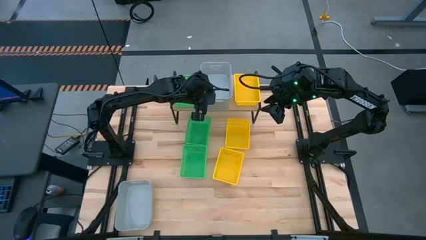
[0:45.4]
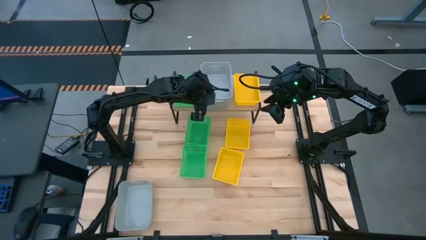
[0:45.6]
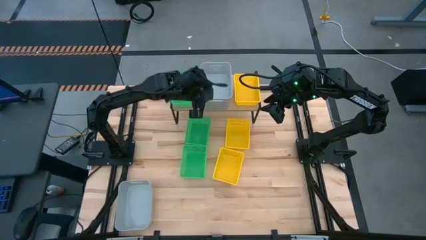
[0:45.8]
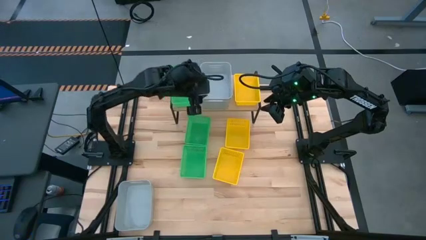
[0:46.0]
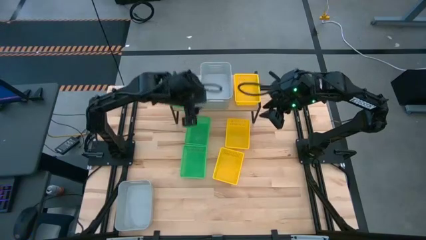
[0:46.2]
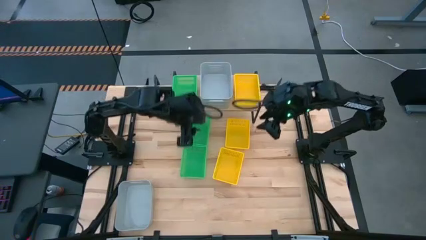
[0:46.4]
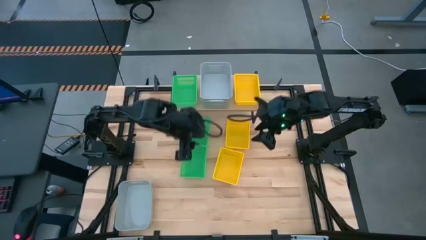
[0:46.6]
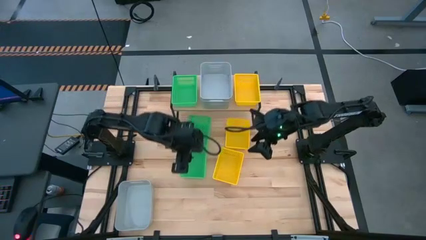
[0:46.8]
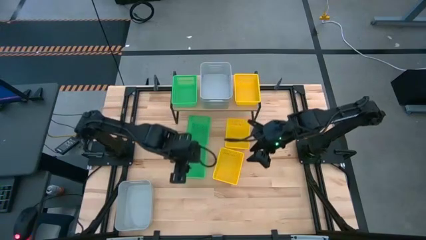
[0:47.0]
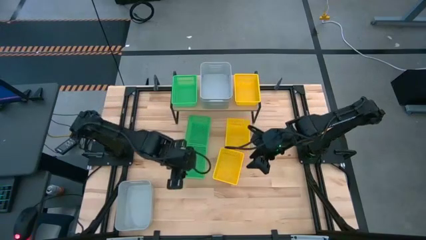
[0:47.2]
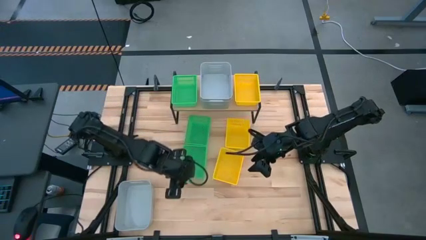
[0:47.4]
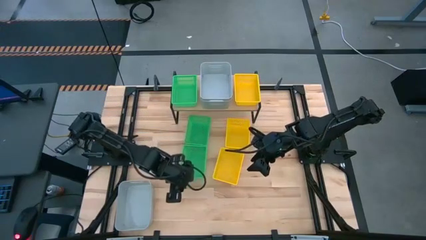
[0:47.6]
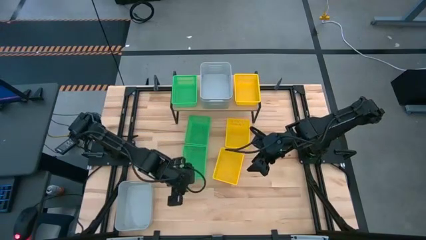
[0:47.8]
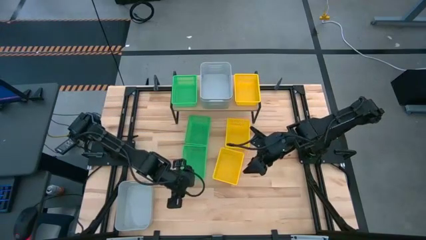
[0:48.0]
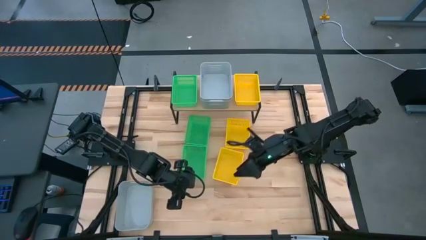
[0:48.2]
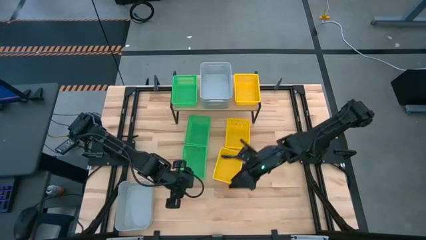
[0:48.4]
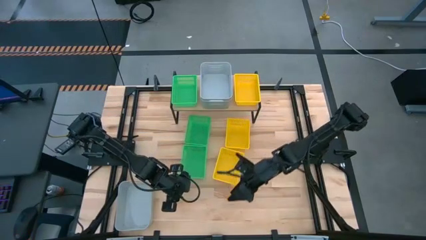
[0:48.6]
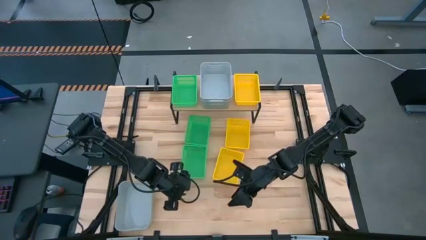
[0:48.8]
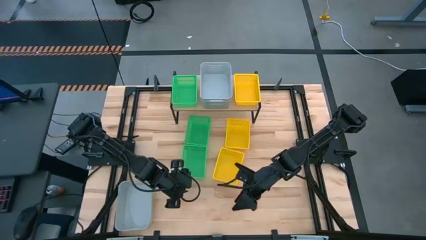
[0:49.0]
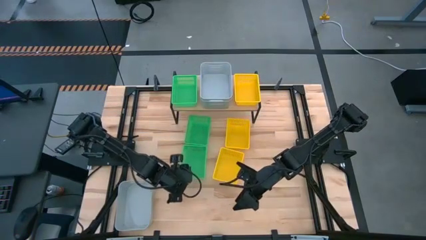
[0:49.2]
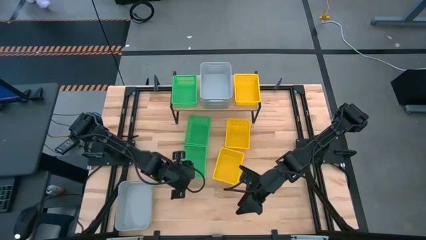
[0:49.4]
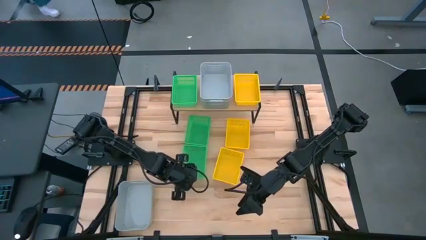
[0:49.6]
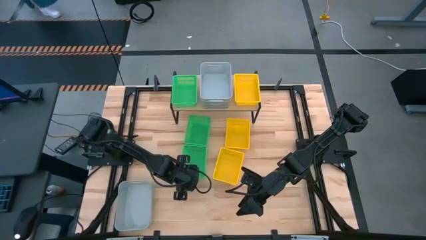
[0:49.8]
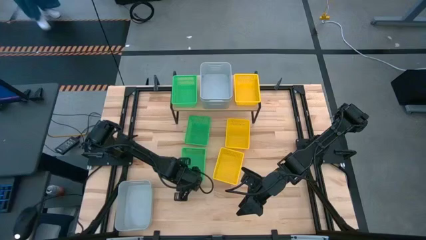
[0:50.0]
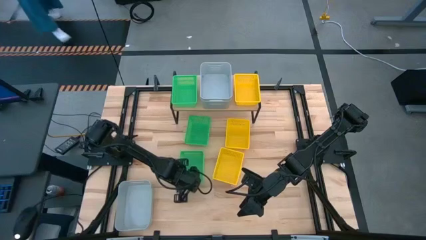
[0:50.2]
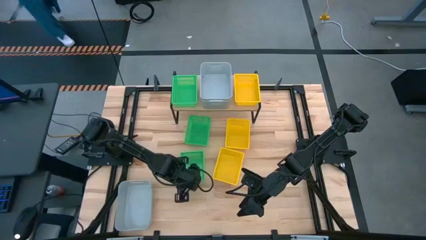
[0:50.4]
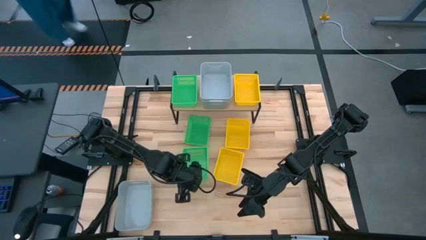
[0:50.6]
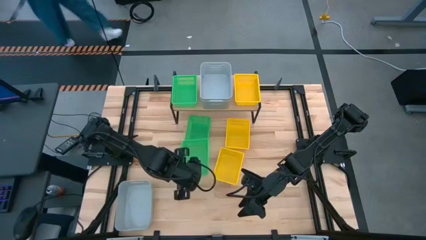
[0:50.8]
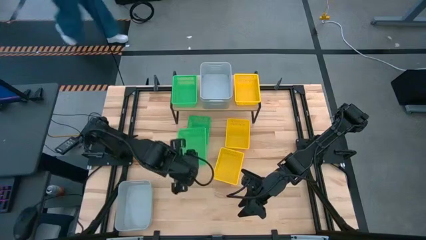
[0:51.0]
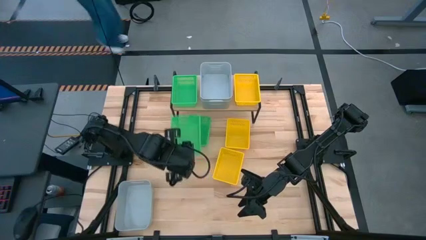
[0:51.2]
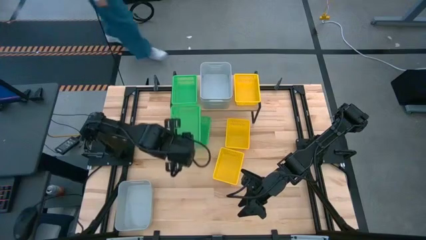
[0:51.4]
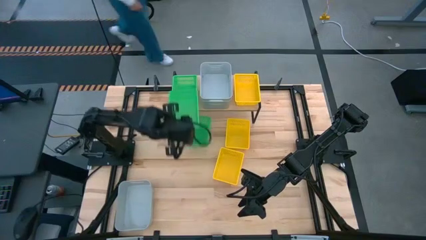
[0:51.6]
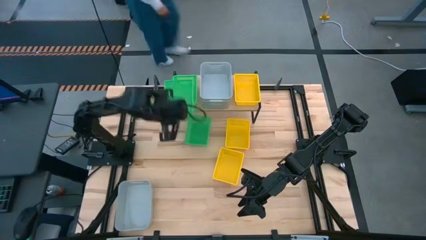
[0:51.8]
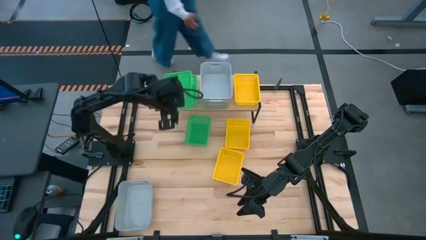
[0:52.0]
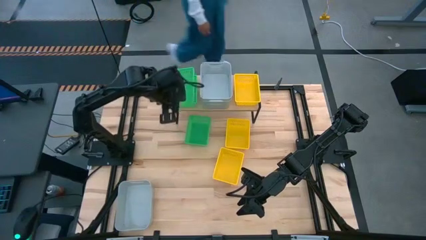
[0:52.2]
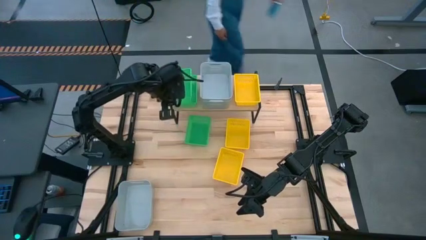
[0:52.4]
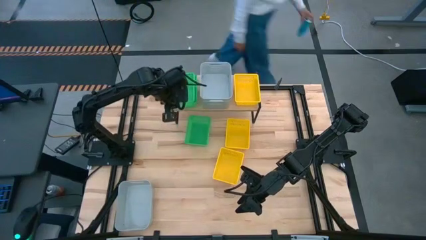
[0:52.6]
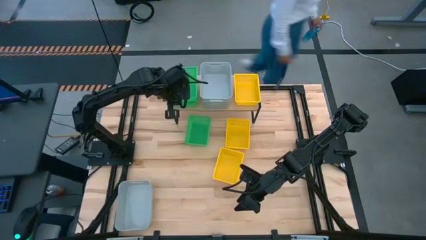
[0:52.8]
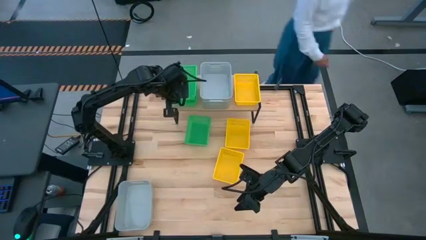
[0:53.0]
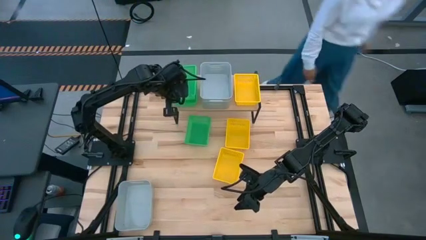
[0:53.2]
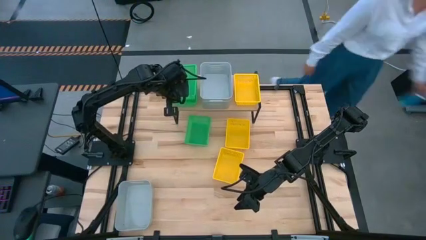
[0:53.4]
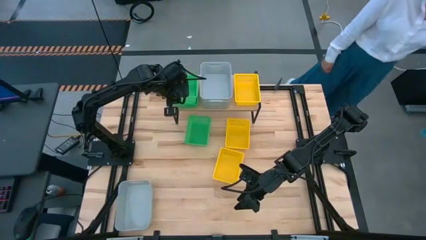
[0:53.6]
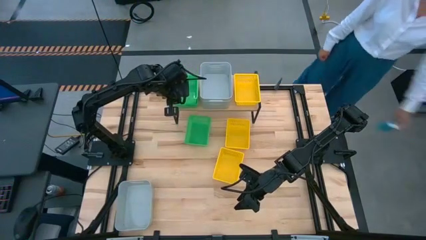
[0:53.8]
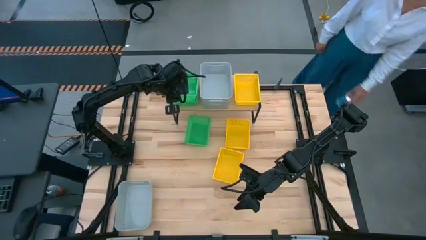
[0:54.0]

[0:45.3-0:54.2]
Task: Stack baskets on shelf by color
Stack the bottom green bin on top of the green bin on the shelf

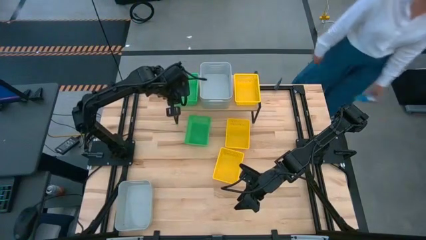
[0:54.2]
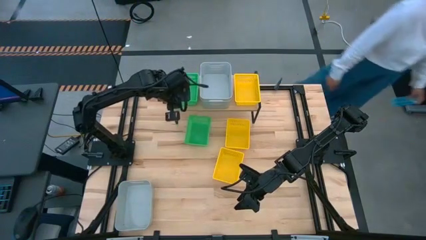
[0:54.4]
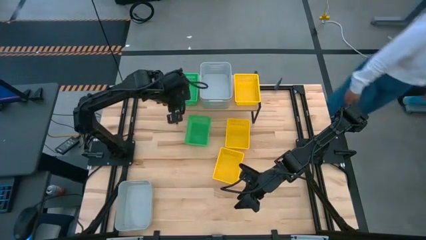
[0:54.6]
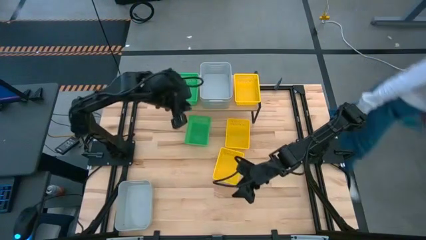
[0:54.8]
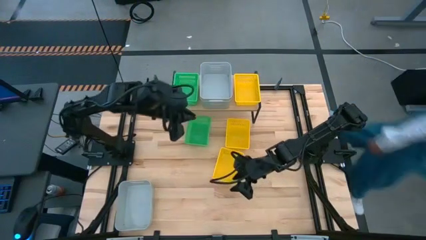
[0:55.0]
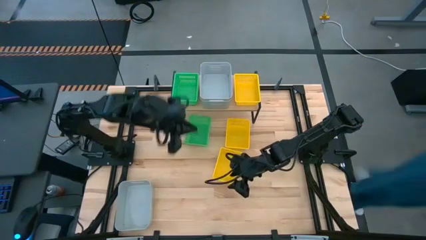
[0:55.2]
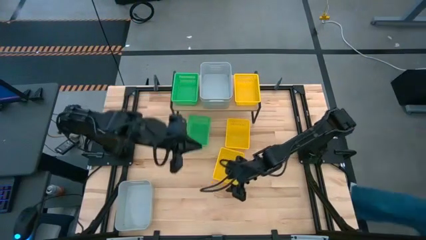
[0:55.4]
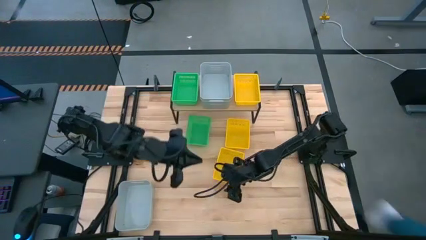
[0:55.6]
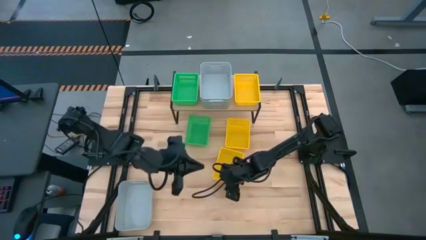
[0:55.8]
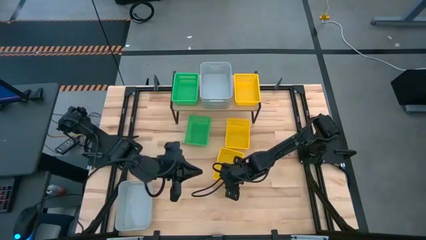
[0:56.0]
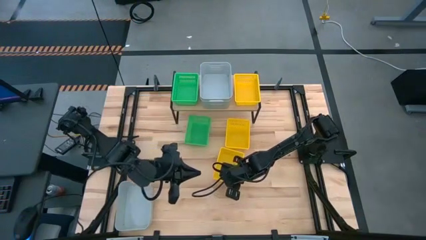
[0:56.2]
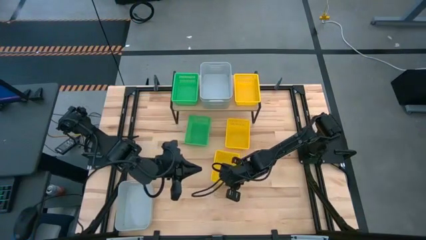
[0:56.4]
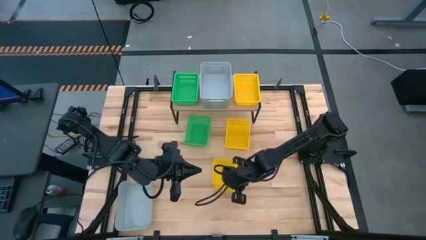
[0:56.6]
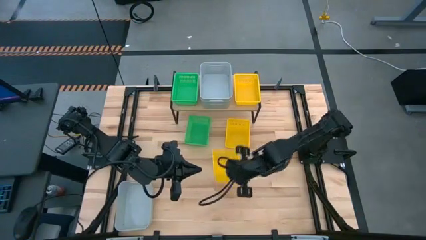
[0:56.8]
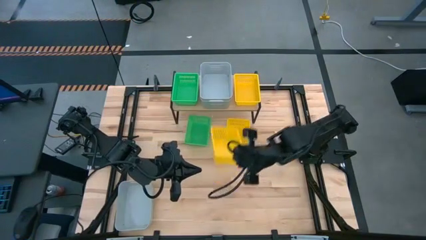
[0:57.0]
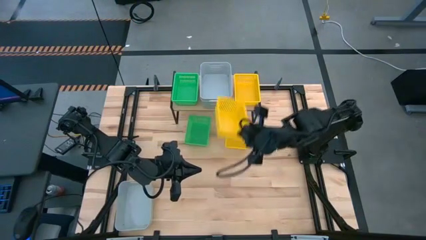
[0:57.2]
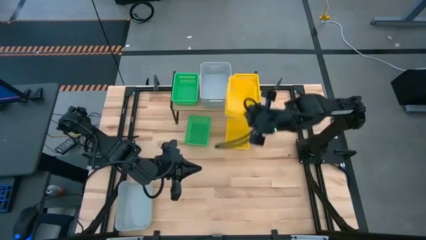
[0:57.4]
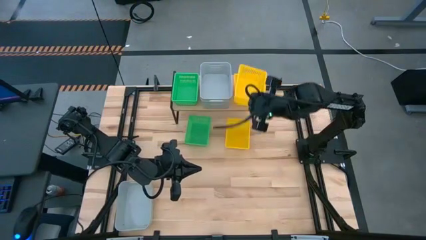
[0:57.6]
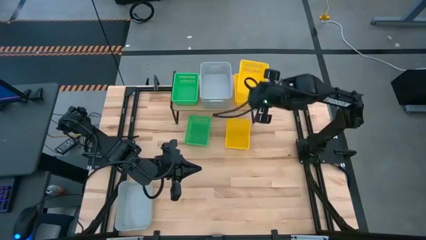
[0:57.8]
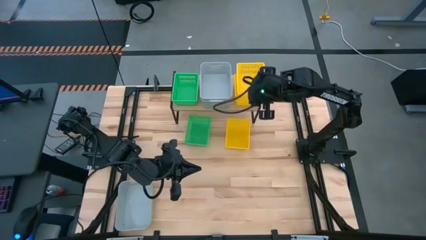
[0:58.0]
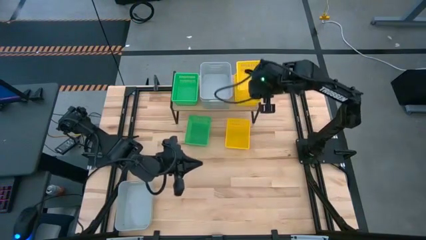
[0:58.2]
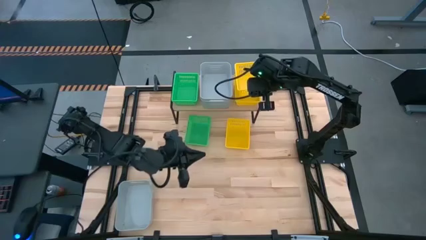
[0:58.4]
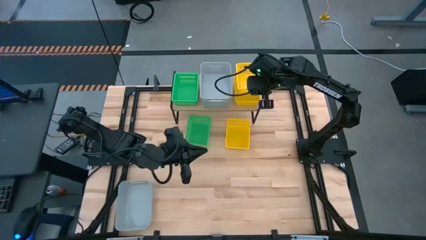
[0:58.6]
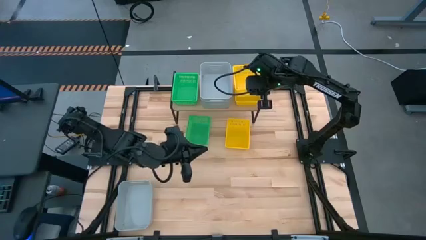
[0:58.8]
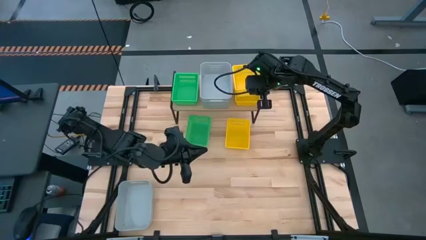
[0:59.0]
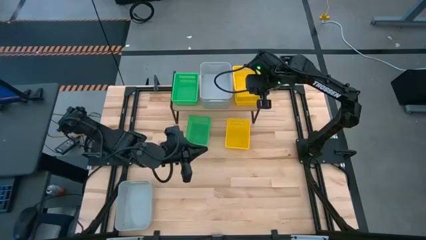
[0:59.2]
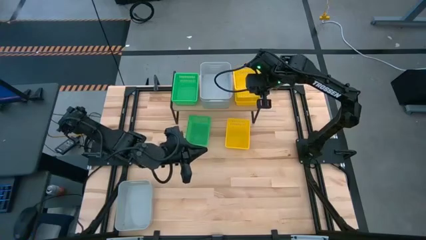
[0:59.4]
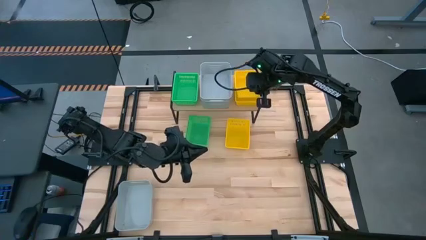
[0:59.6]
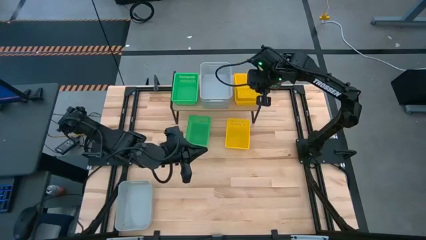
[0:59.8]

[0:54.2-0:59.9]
Stack the bottom yellow bin on top of the yellow bin on the shelf
